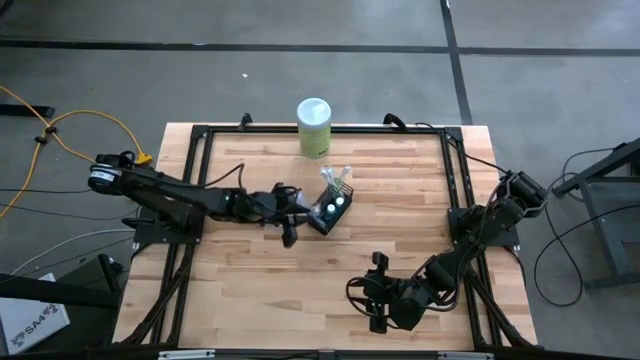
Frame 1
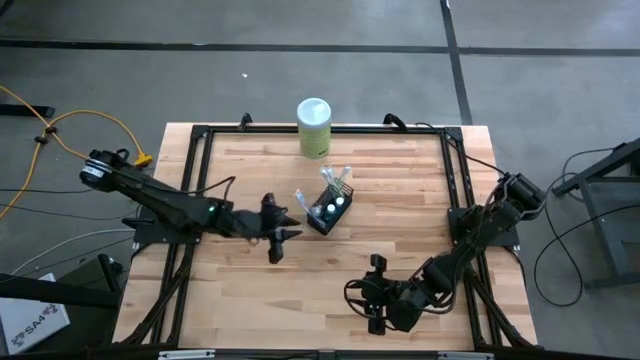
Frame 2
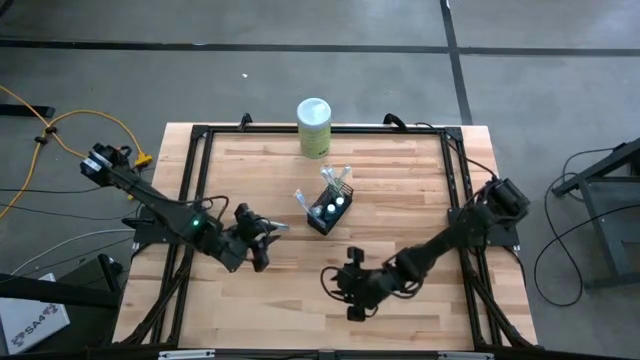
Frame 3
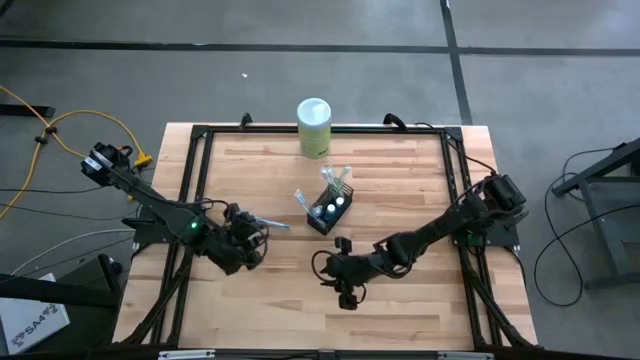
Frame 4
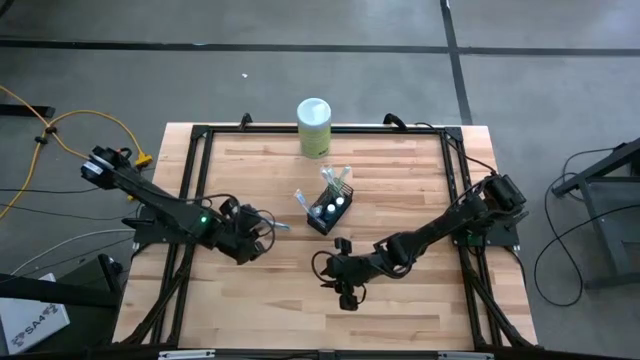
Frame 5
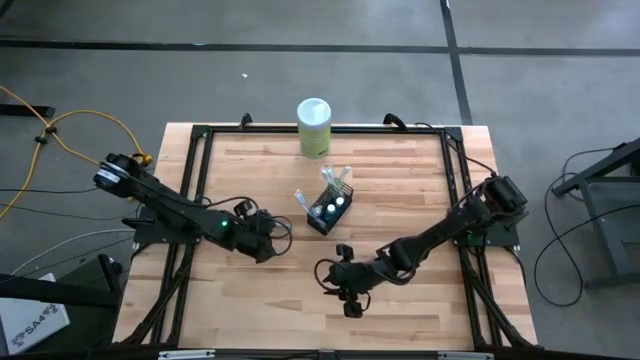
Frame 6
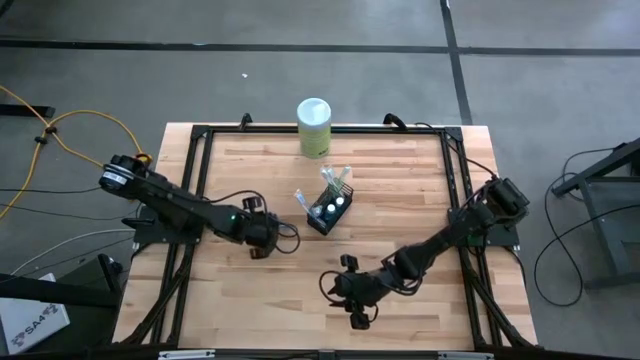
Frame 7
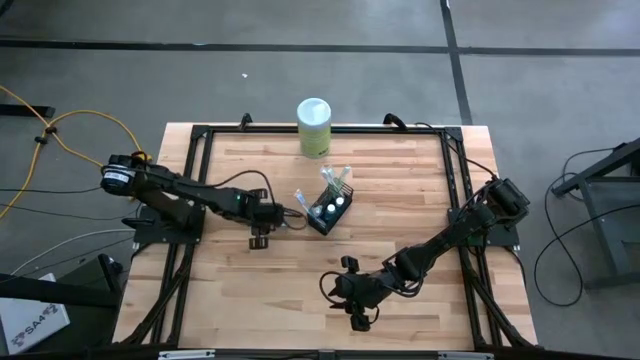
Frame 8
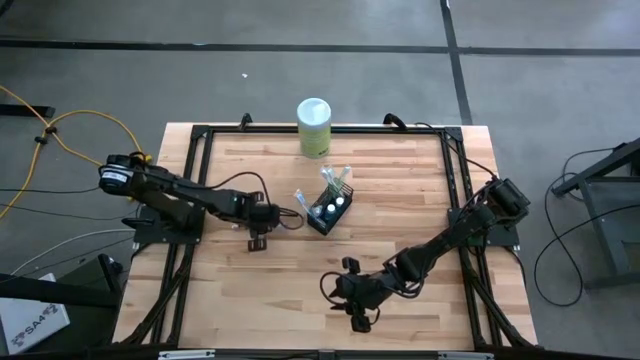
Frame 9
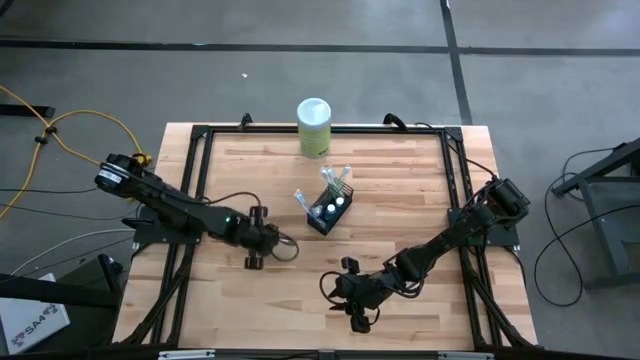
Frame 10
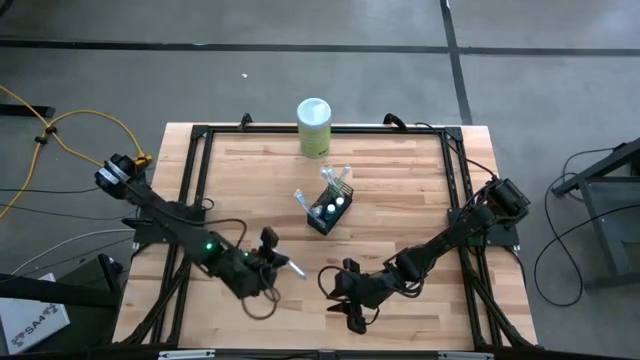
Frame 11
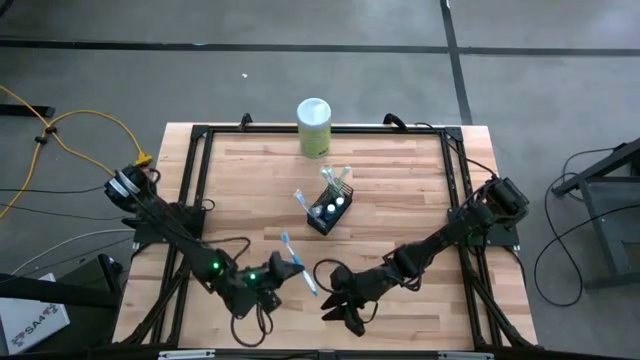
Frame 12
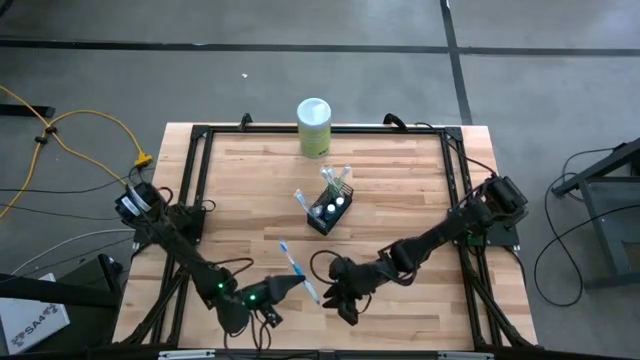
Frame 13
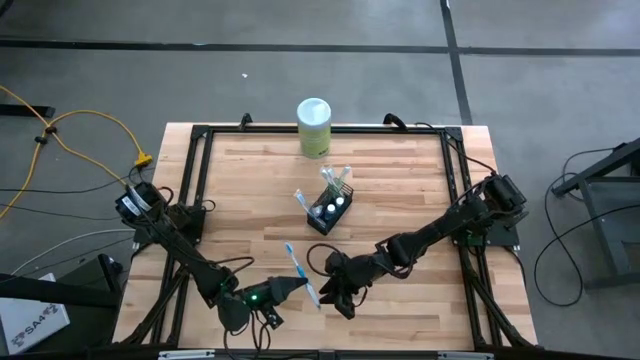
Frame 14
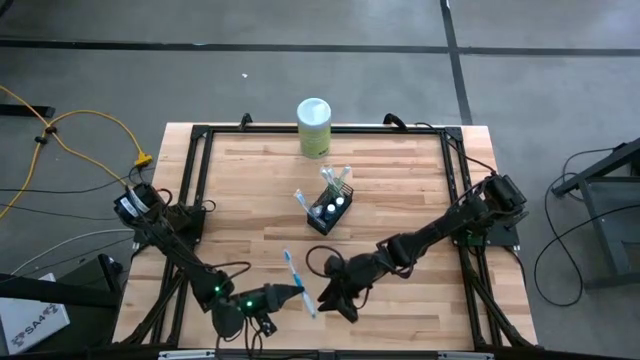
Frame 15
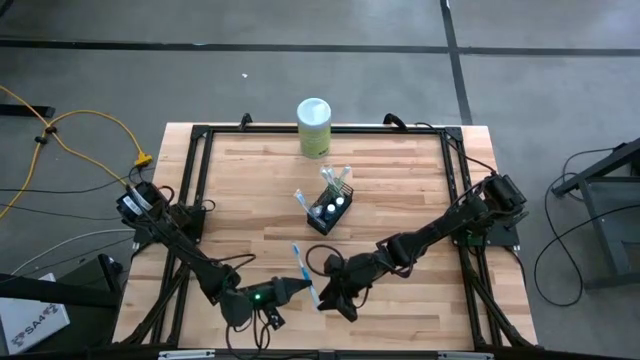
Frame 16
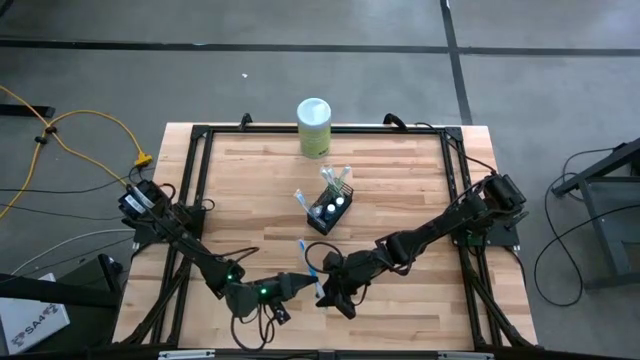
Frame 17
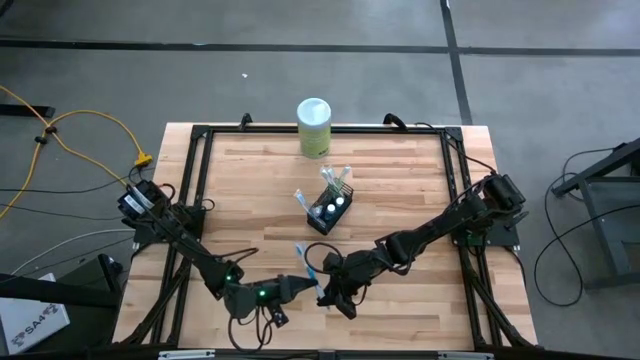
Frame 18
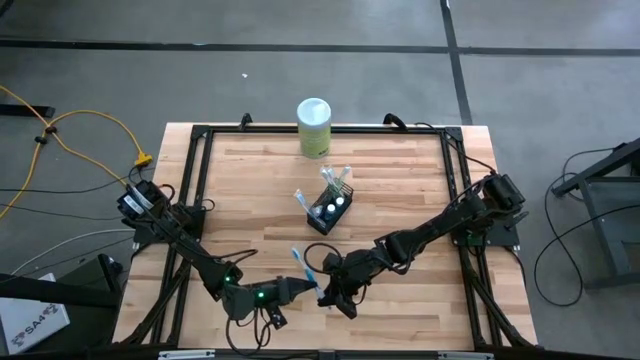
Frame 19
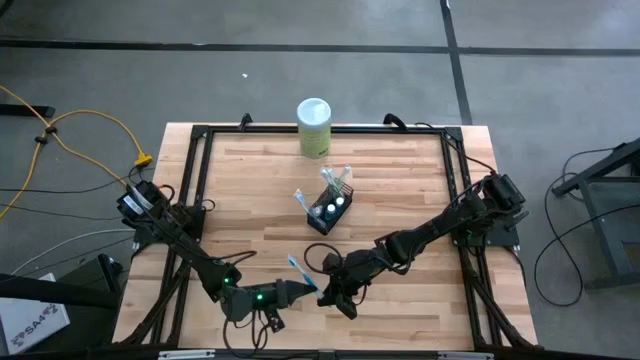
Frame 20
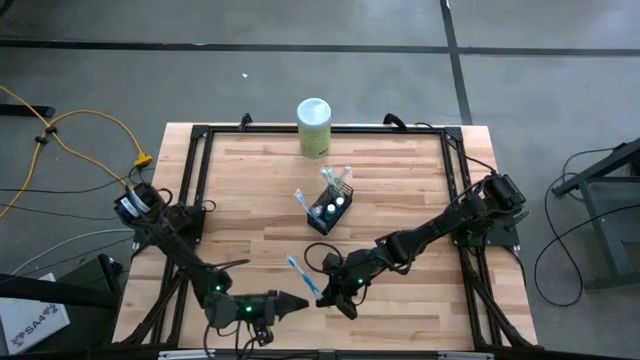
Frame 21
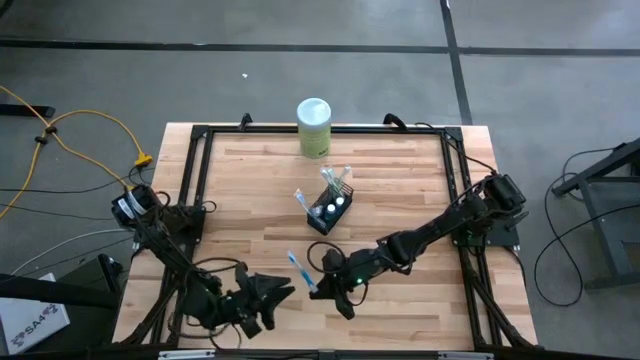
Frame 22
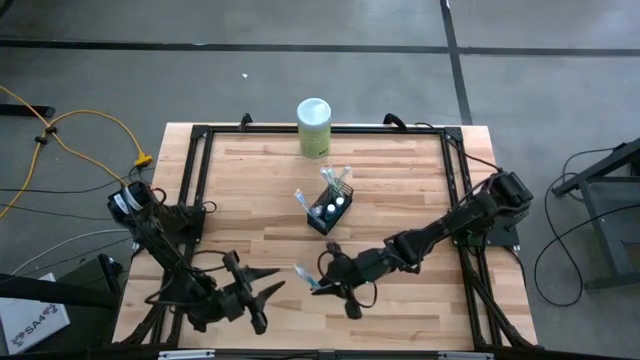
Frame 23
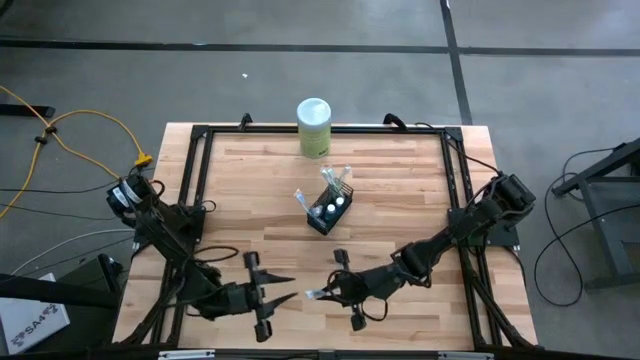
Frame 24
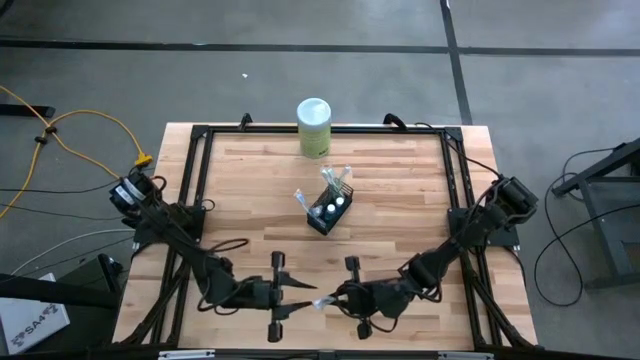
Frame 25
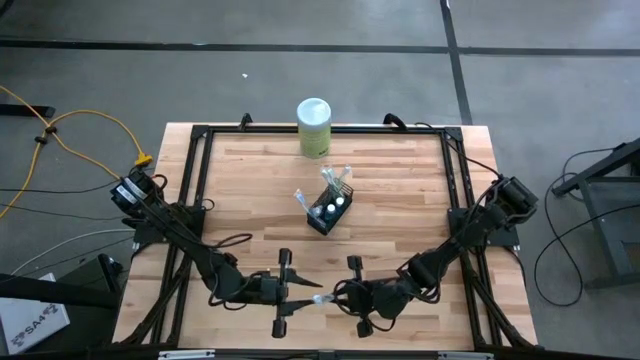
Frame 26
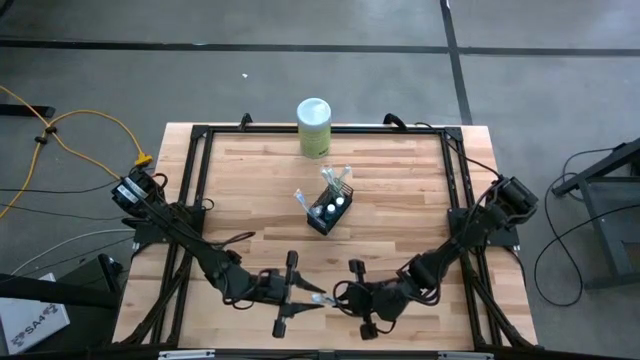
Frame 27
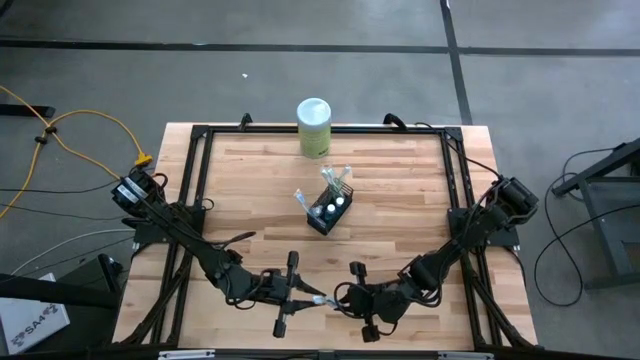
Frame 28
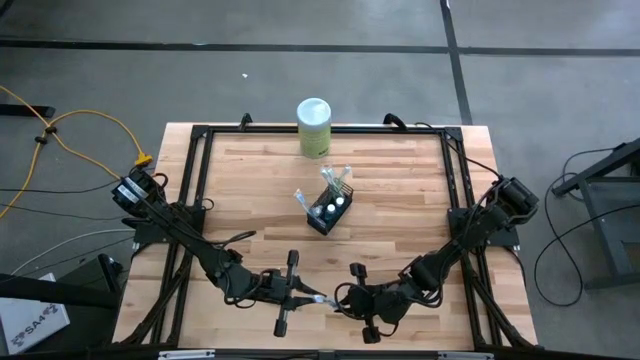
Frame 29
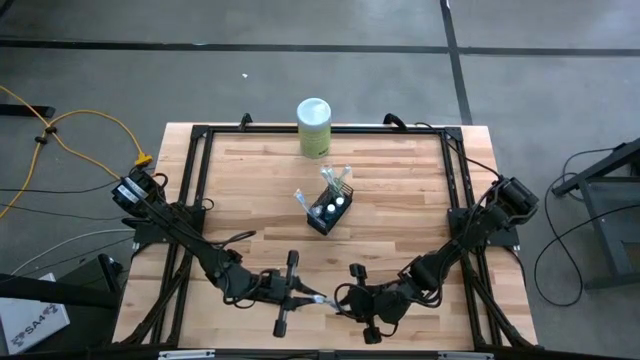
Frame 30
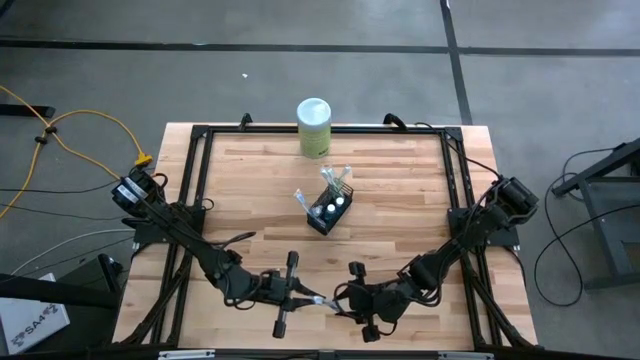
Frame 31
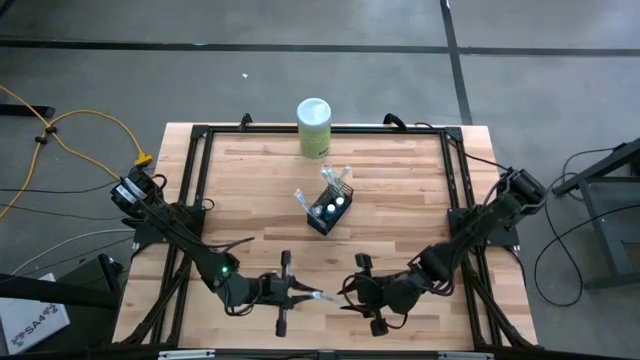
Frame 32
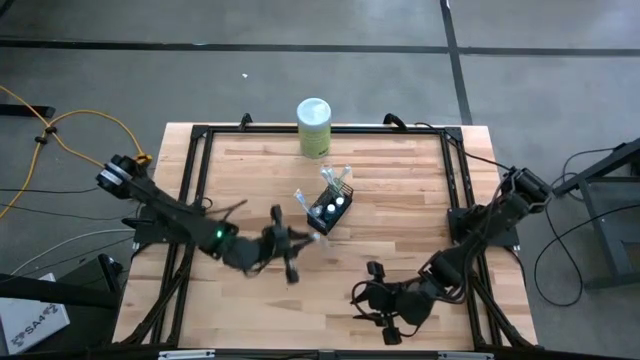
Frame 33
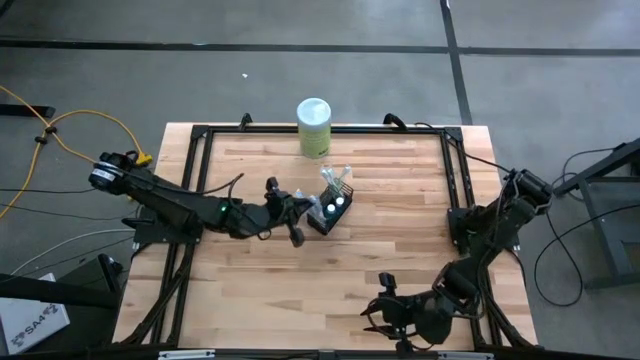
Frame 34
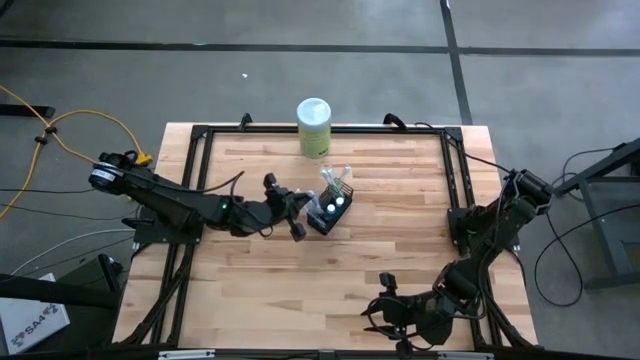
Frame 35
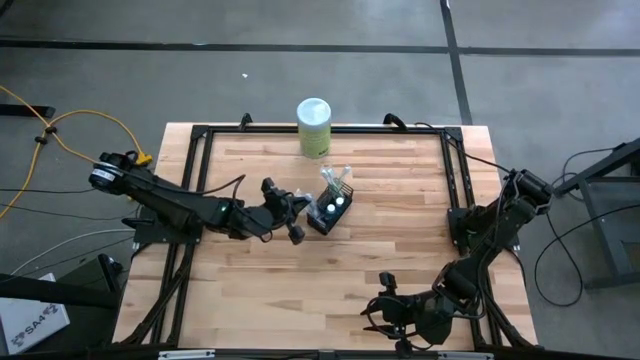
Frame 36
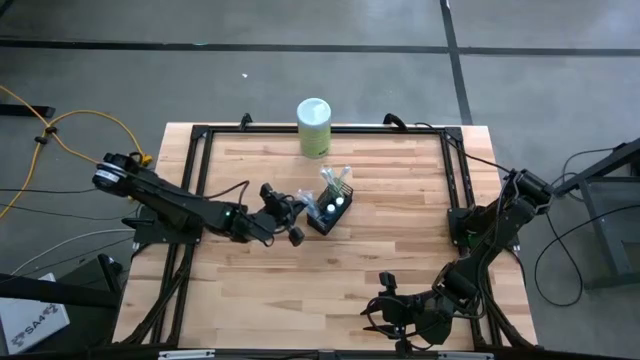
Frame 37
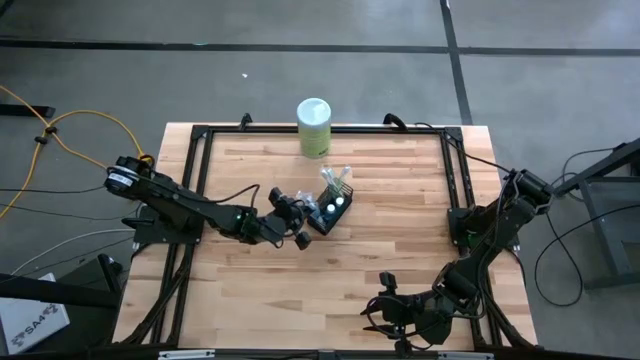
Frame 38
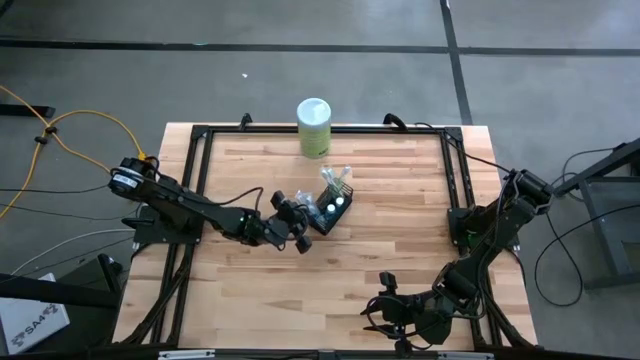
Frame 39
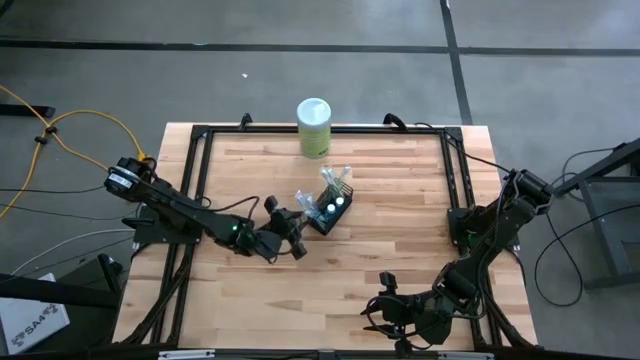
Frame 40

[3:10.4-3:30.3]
Task: Pick & Place toothbrushing station
Put the blue toothbrush into the left section of the black wire organizer
